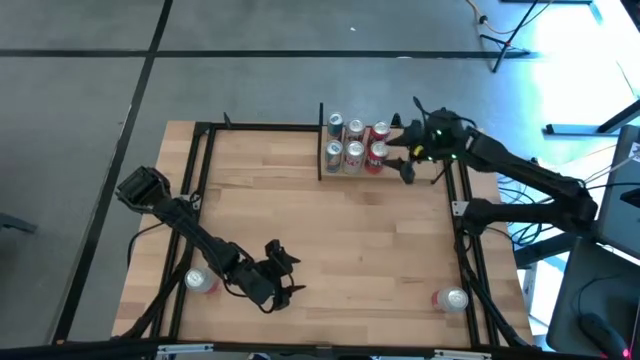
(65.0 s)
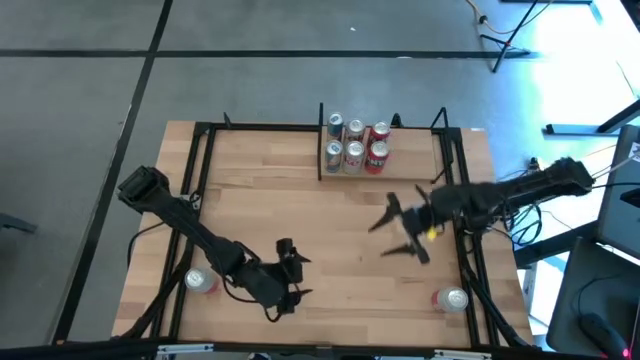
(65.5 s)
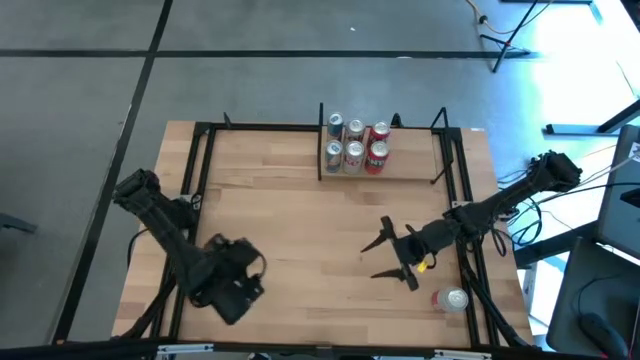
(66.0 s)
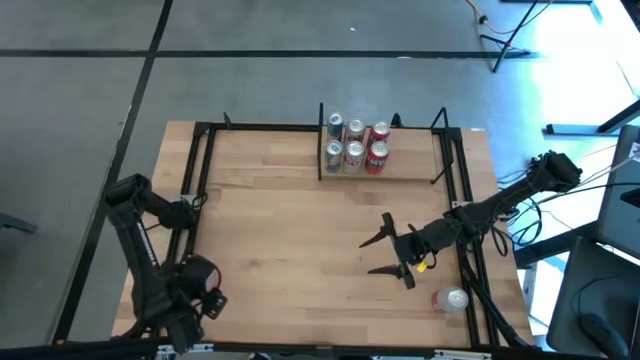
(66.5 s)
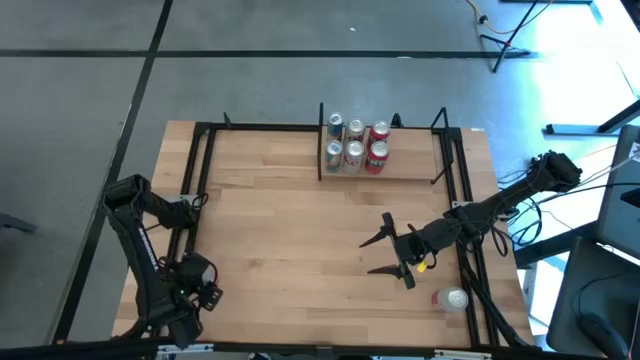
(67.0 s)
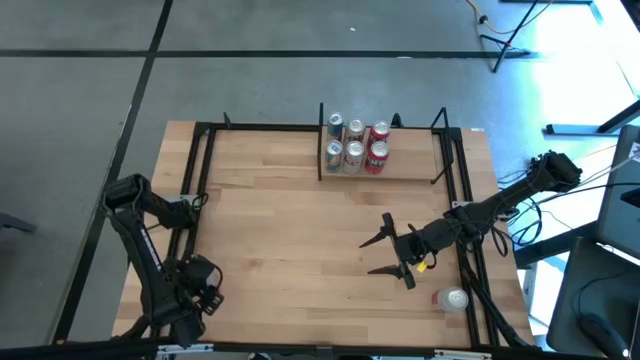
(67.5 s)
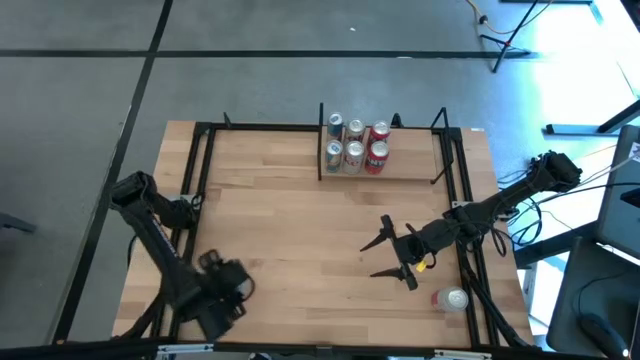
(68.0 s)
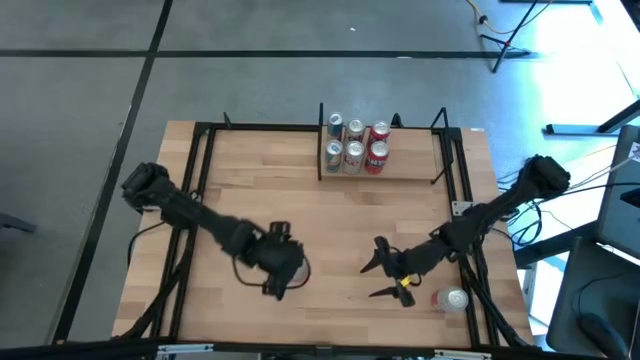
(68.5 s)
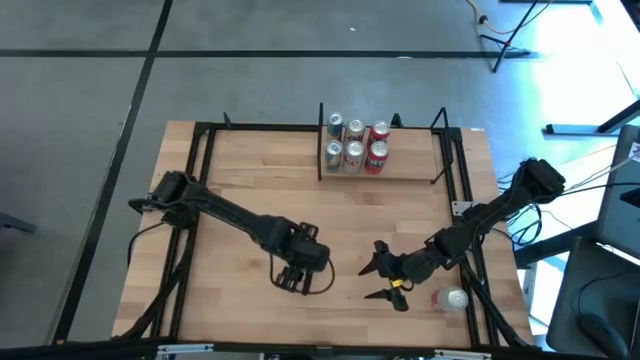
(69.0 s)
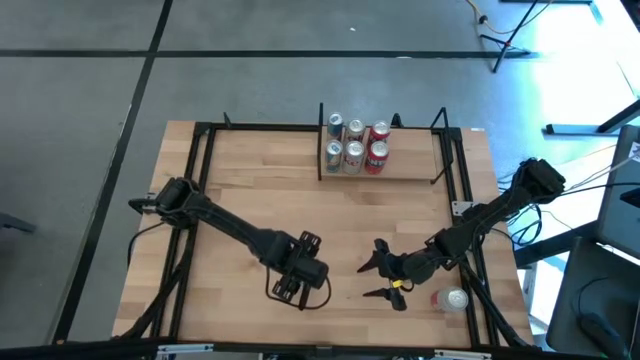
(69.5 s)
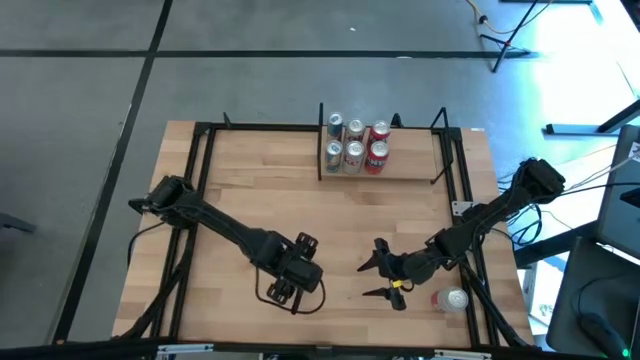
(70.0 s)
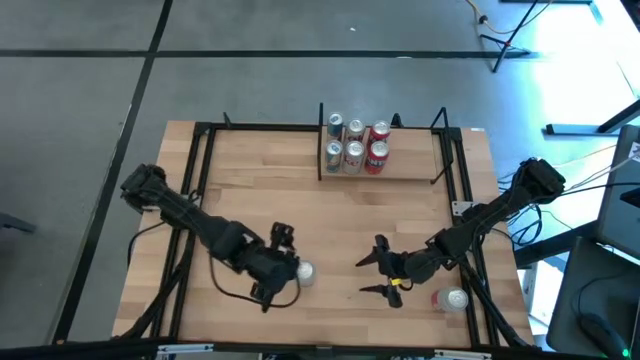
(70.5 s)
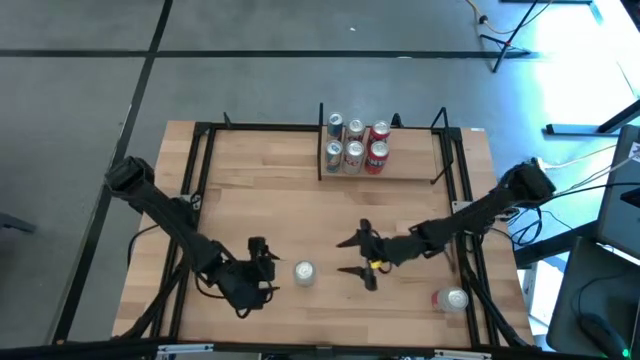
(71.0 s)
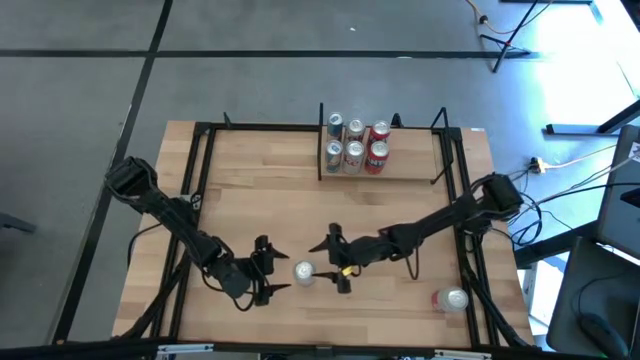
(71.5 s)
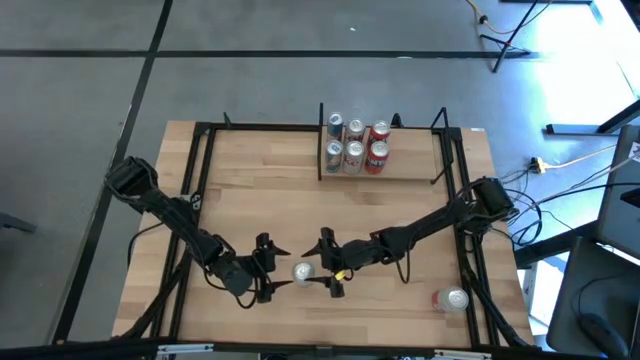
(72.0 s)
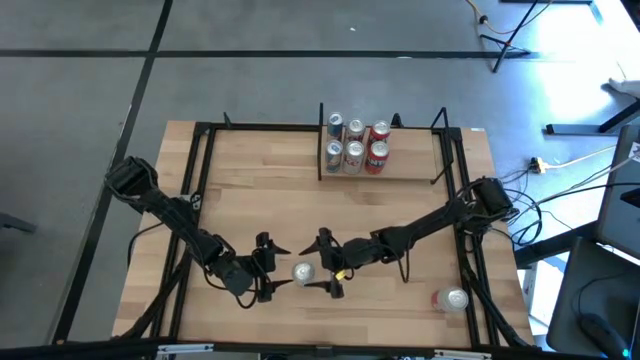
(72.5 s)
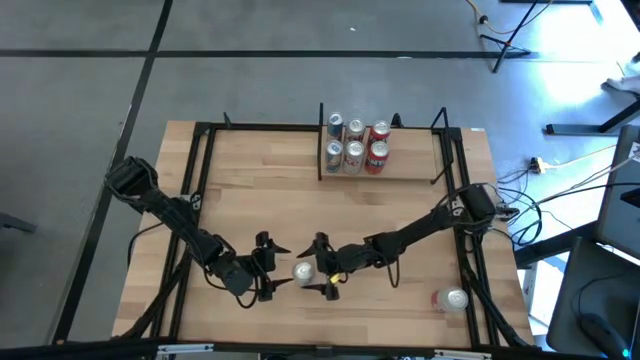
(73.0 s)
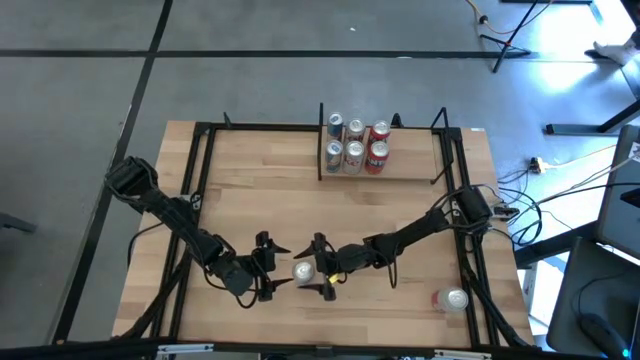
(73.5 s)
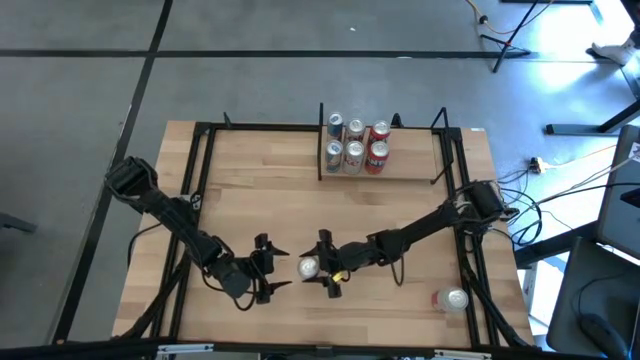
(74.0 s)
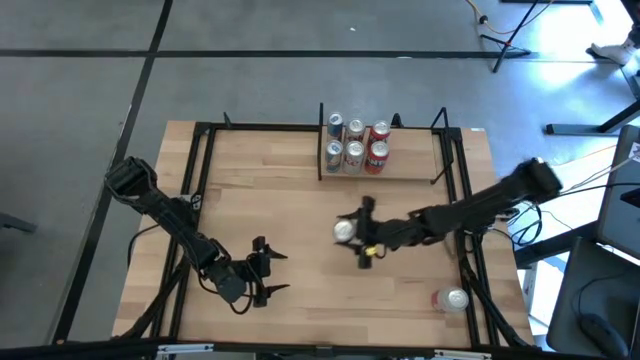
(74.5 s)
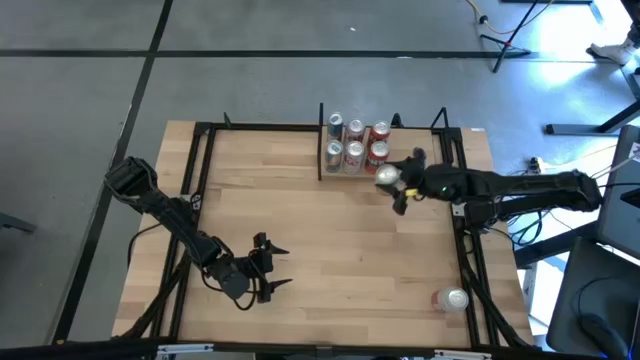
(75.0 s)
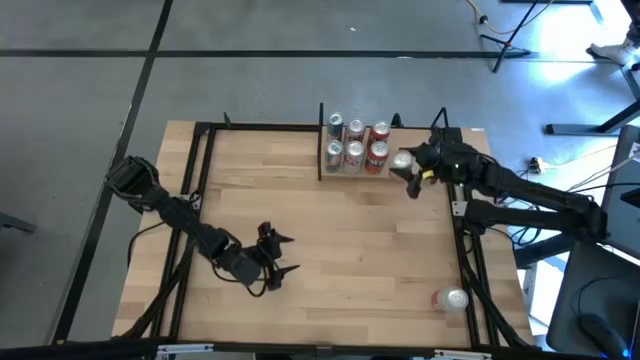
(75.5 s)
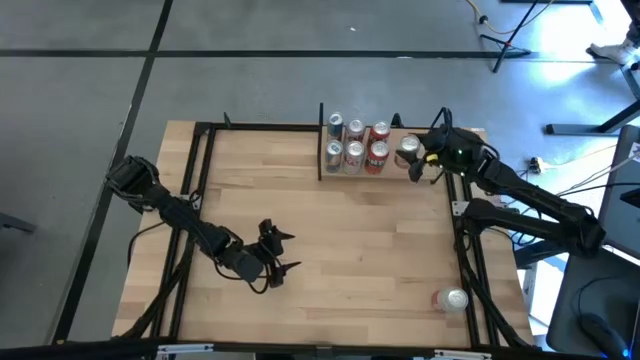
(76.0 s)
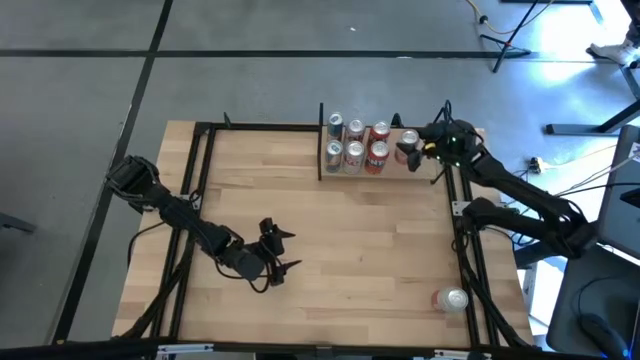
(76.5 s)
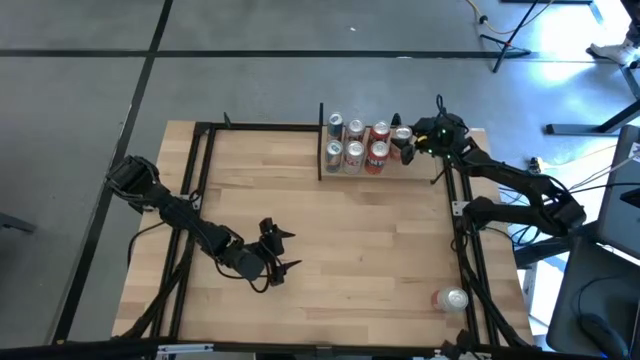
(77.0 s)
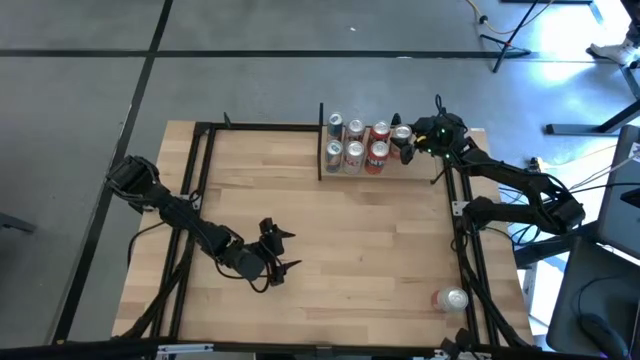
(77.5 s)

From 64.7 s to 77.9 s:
Task: Place canned beverage on shelf
Put the left pink-white soda can on the shelf

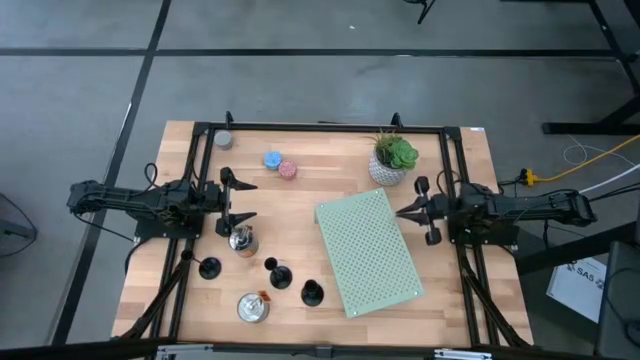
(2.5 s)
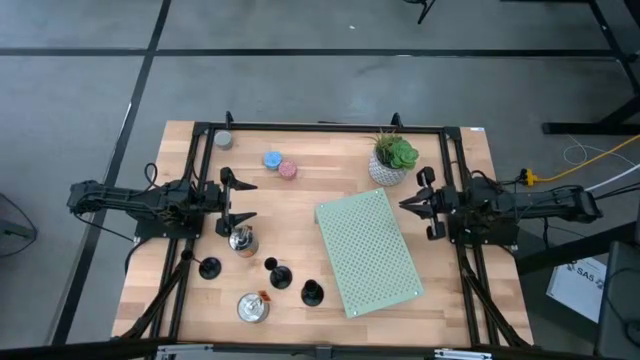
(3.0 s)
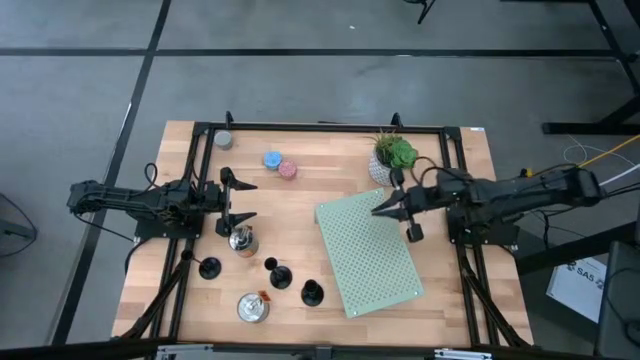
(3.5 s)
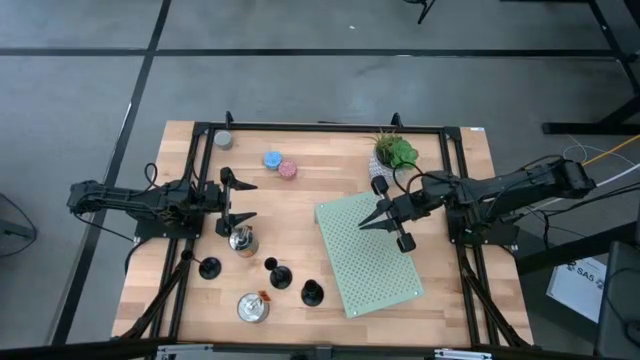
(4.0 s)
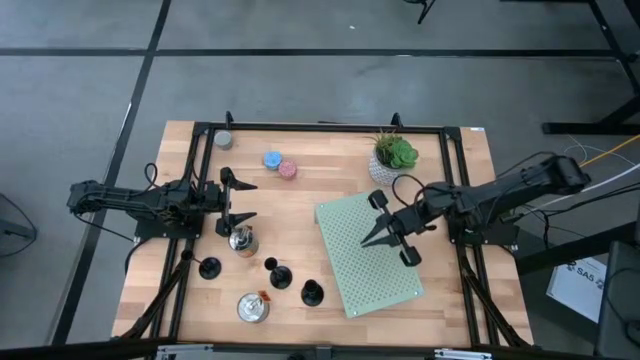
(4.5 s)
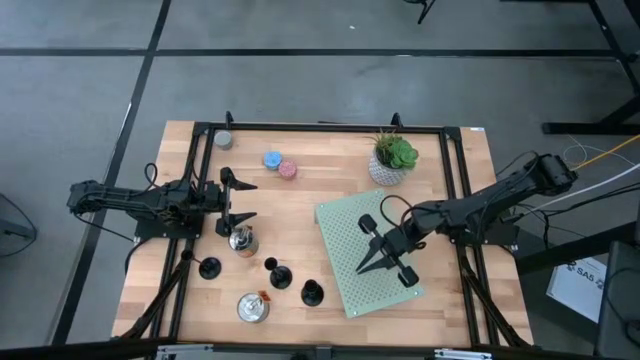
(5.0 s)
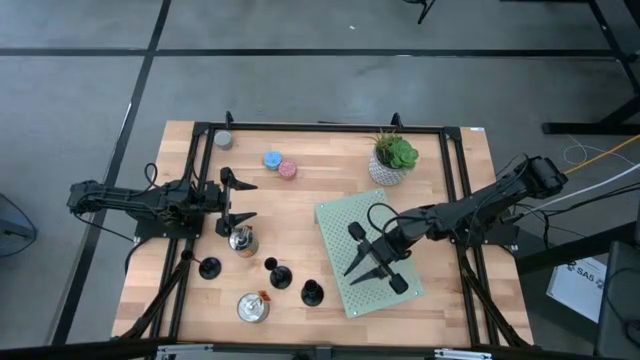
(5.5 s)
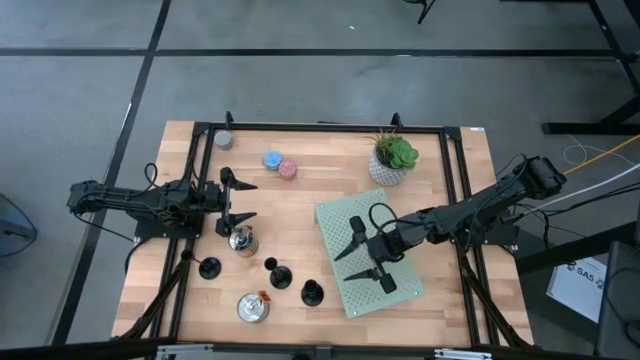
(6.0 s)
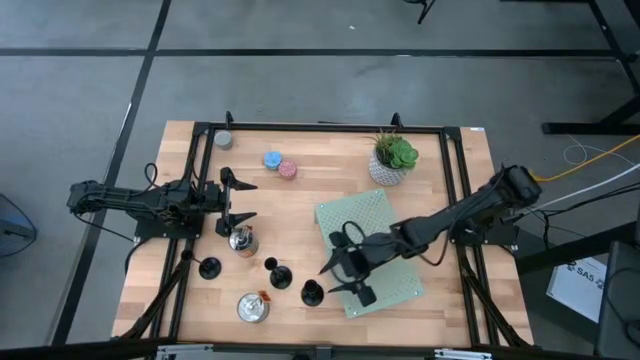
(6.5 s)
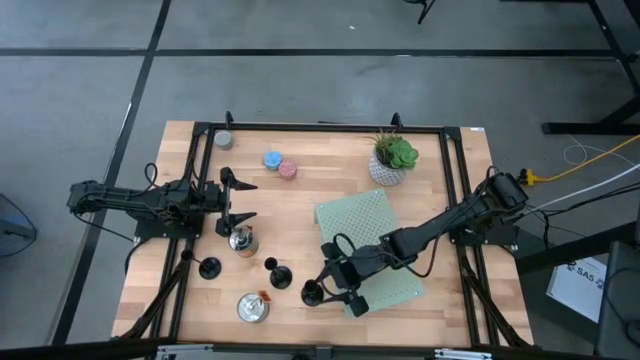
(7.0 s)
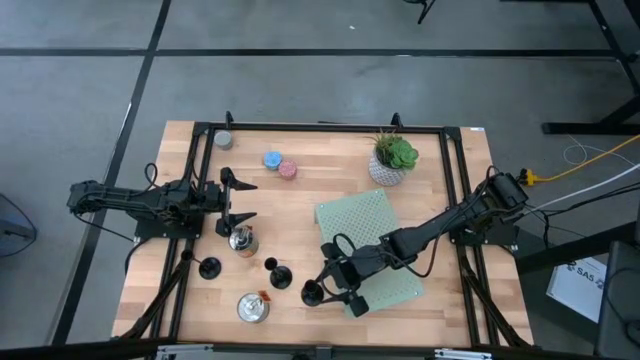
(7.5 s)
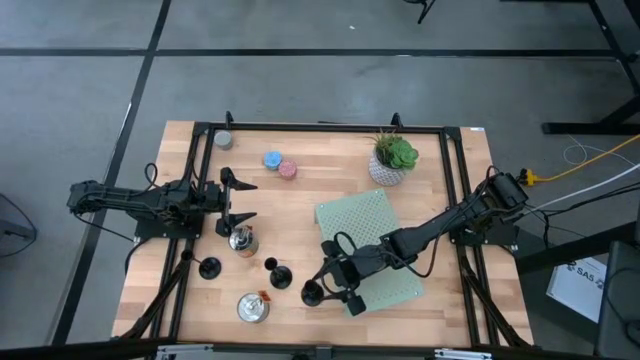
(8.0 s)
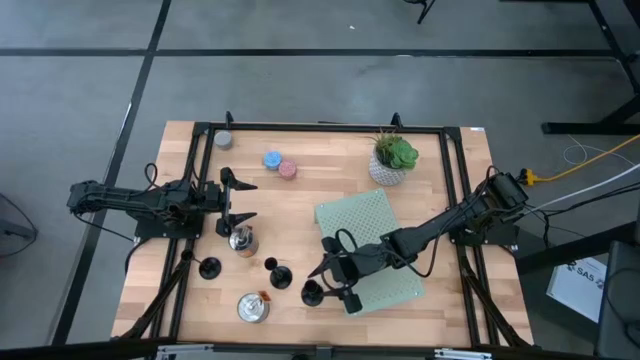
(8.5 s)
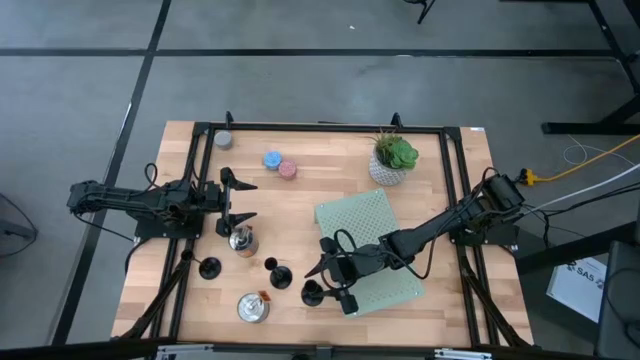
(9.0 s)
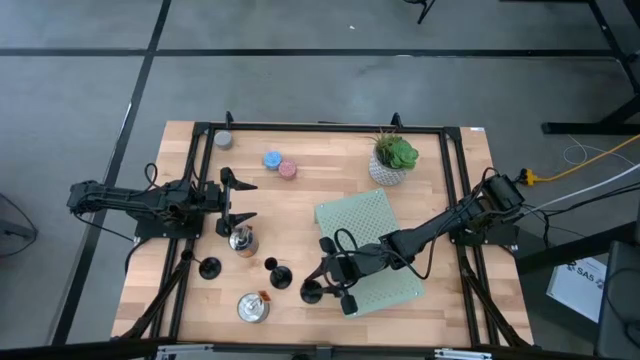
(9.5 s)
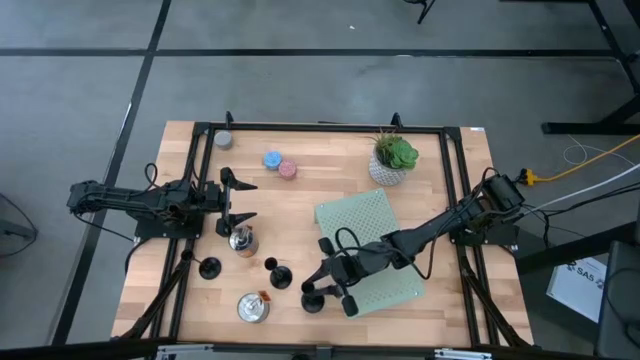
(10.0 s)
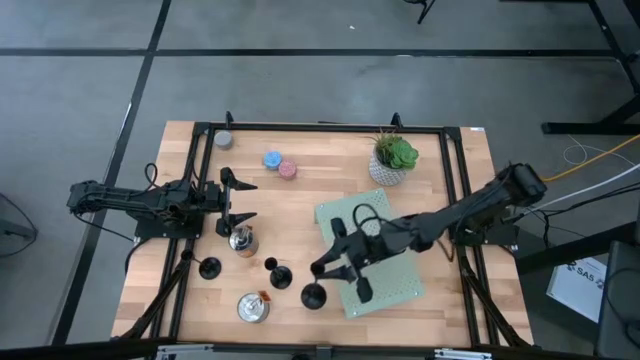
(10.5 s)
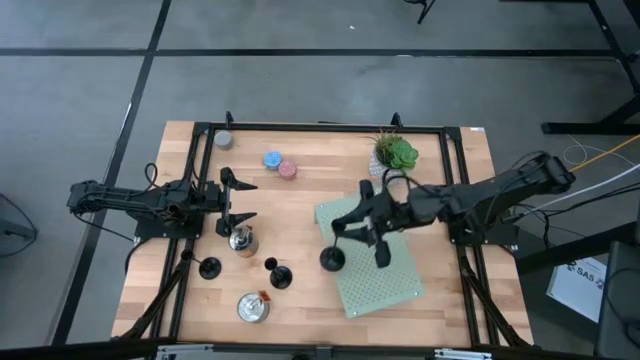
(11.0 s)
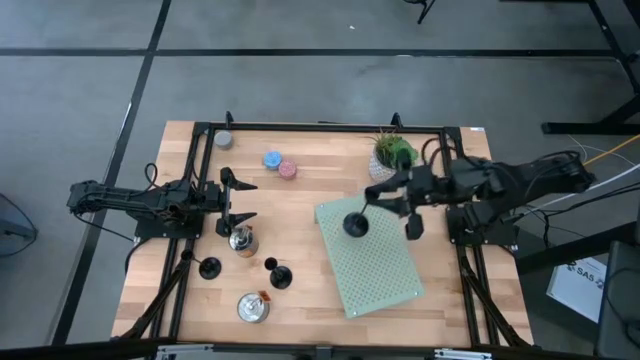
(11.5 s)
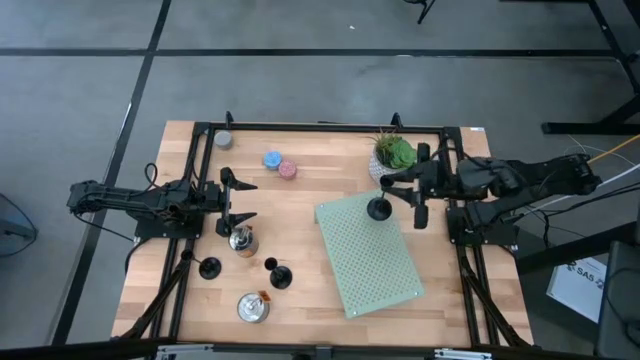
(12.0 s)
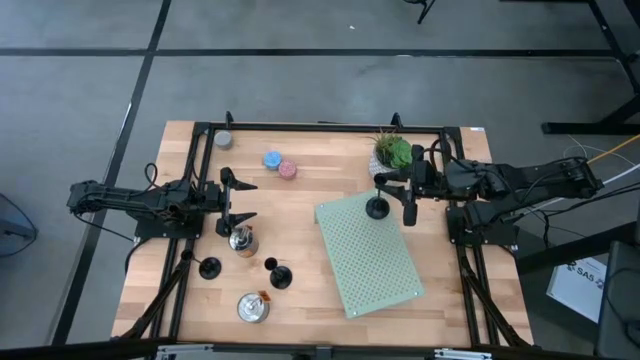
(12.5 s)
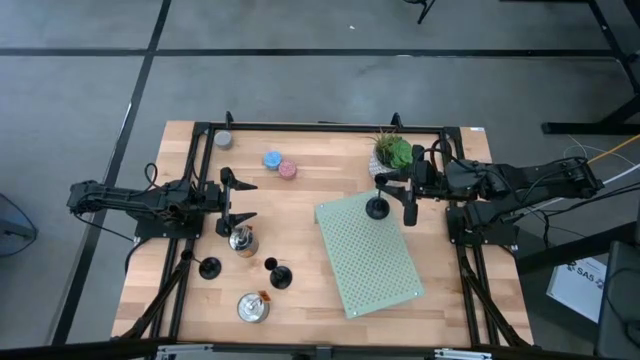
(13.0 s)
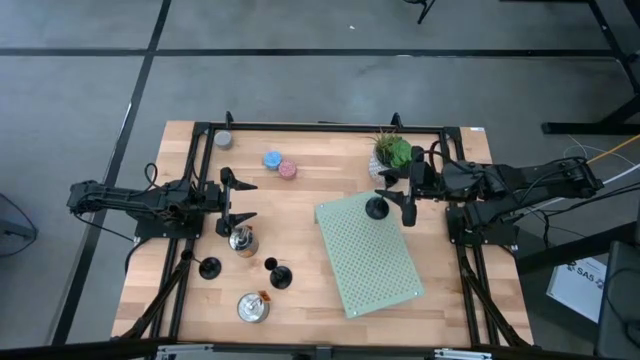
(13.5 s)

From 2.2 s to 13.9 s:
Task: Pick & Place candle stick holders
Put the bottom black candle holder on the shelf
